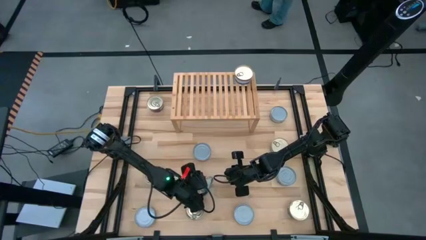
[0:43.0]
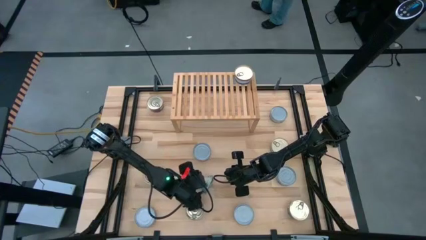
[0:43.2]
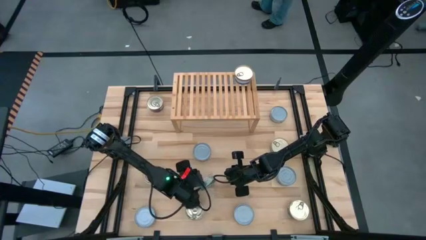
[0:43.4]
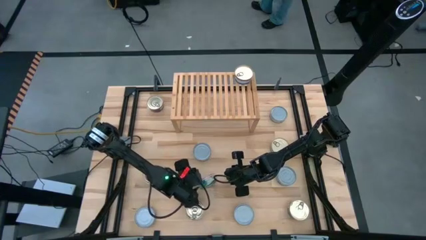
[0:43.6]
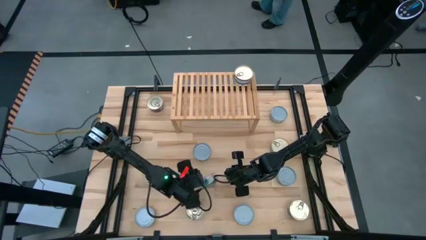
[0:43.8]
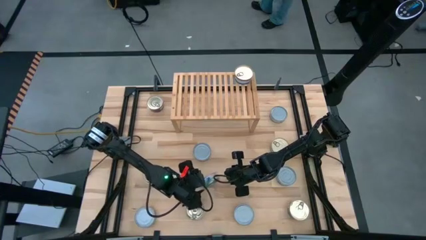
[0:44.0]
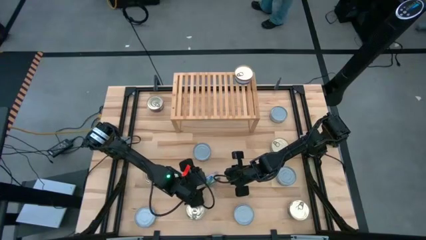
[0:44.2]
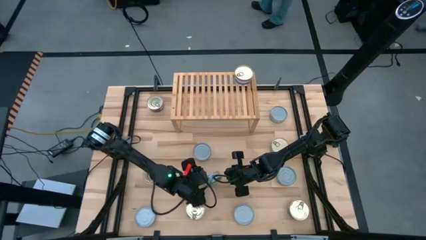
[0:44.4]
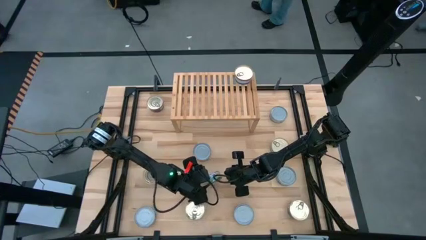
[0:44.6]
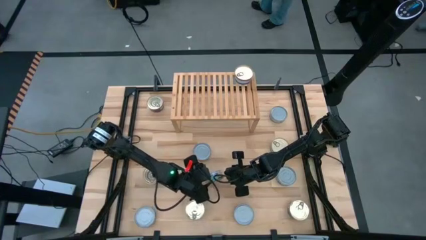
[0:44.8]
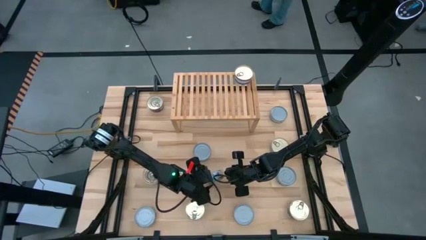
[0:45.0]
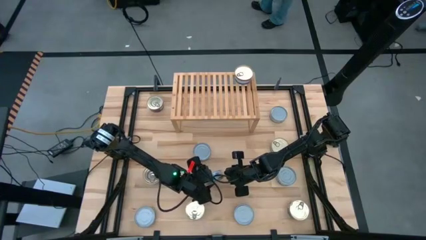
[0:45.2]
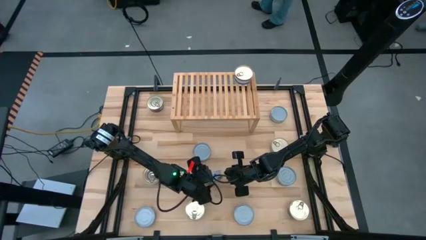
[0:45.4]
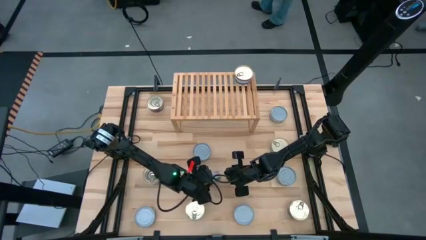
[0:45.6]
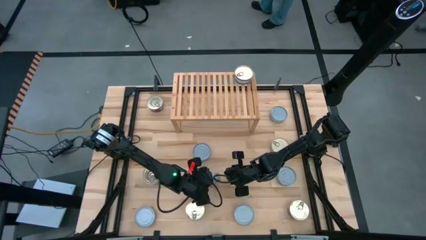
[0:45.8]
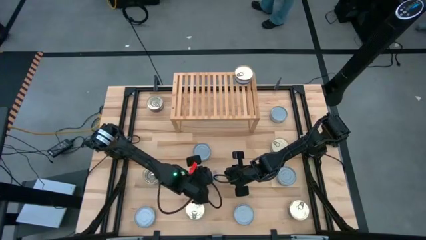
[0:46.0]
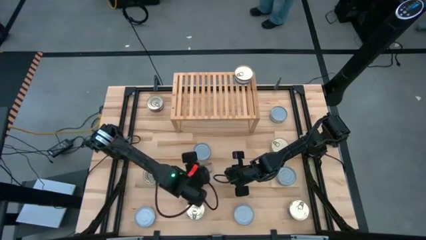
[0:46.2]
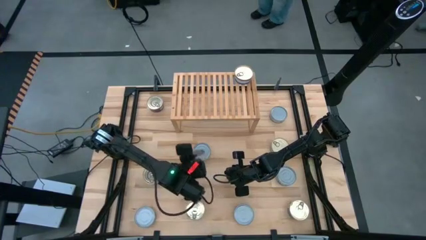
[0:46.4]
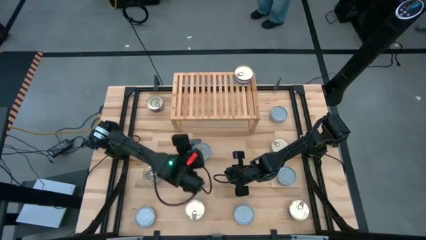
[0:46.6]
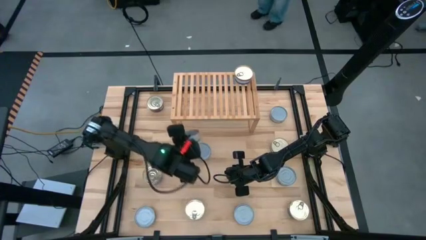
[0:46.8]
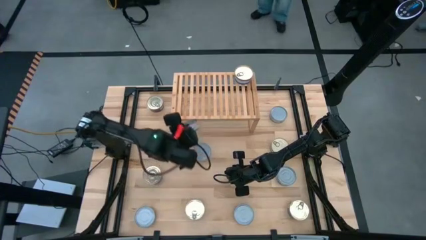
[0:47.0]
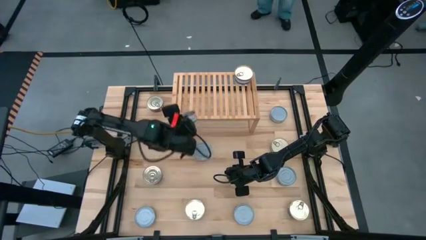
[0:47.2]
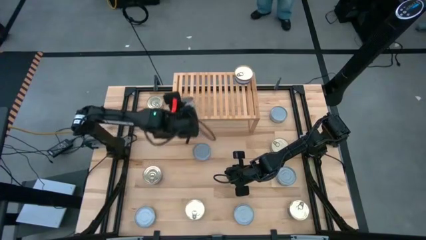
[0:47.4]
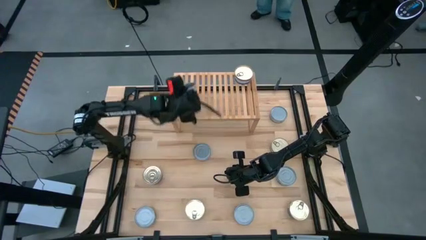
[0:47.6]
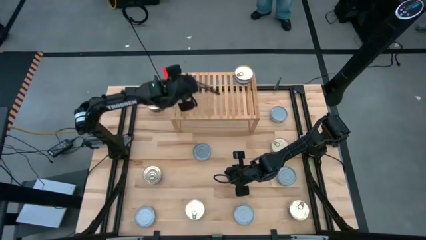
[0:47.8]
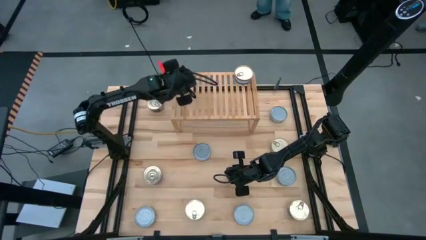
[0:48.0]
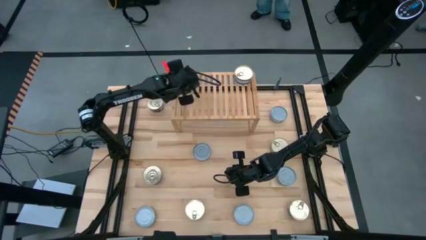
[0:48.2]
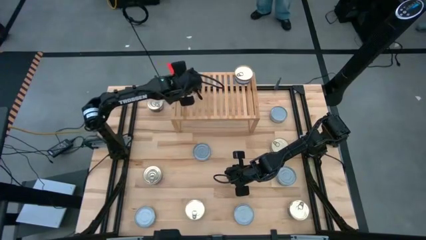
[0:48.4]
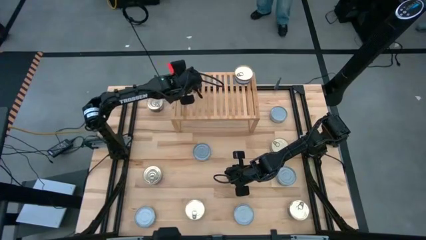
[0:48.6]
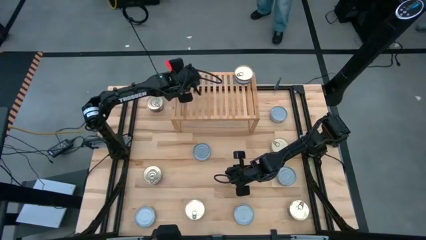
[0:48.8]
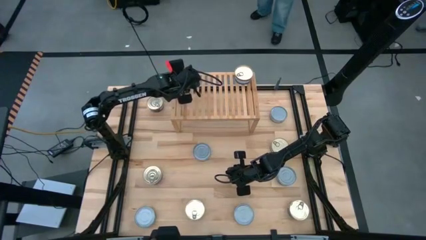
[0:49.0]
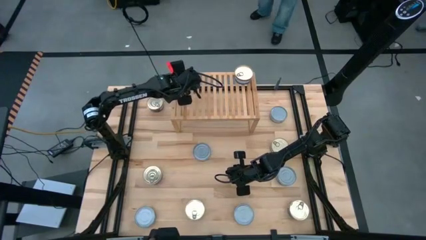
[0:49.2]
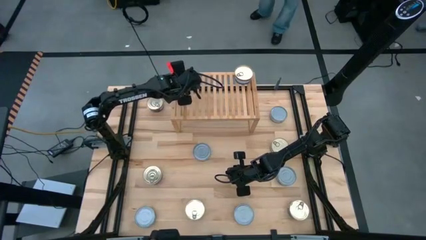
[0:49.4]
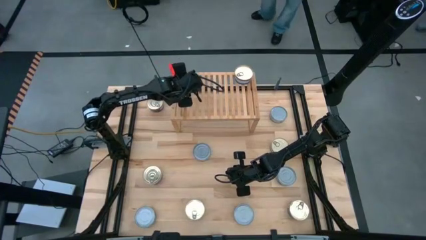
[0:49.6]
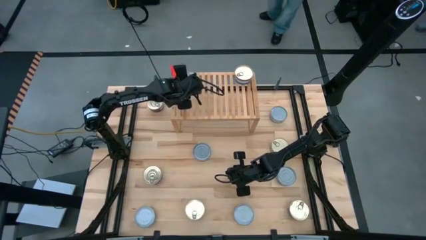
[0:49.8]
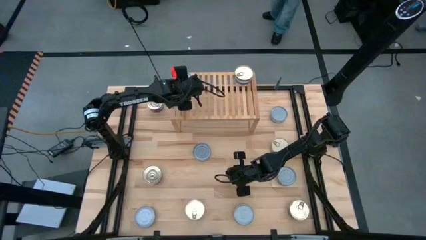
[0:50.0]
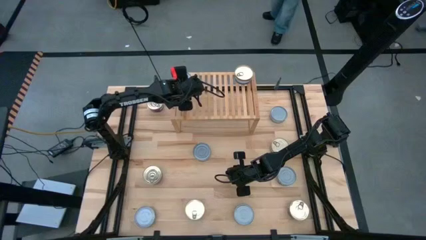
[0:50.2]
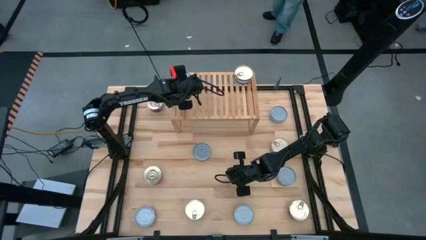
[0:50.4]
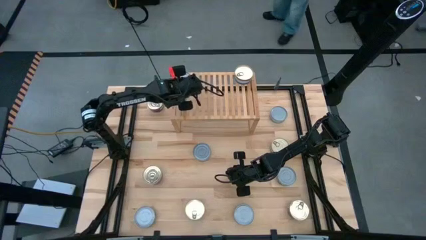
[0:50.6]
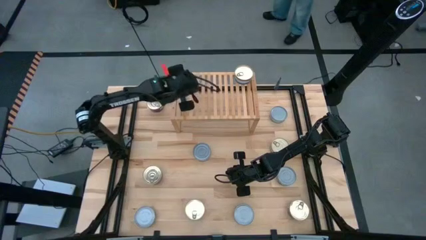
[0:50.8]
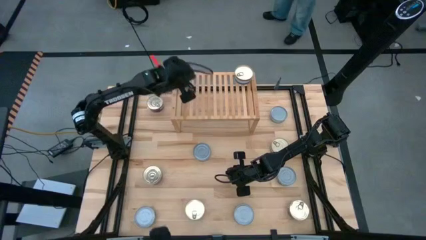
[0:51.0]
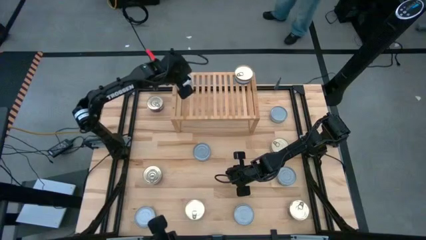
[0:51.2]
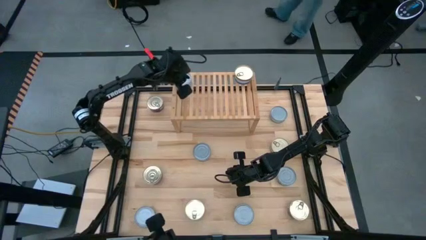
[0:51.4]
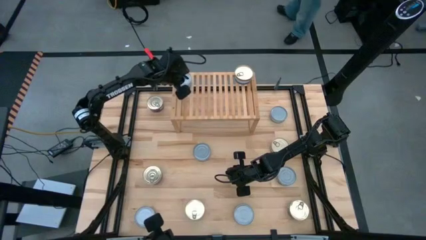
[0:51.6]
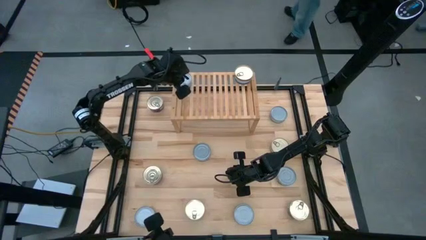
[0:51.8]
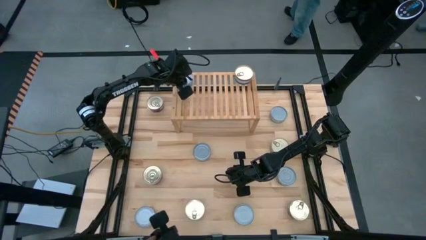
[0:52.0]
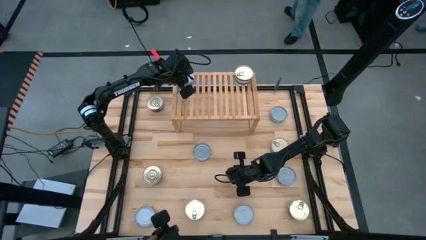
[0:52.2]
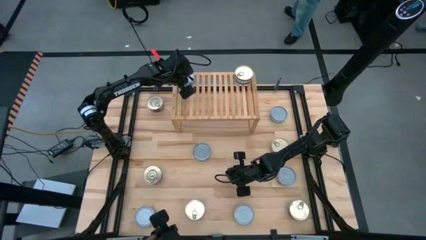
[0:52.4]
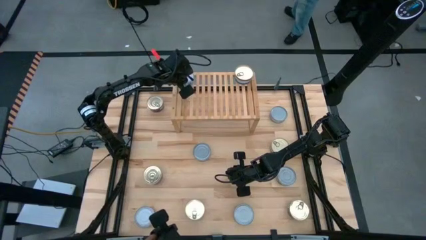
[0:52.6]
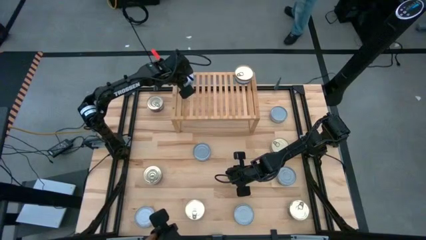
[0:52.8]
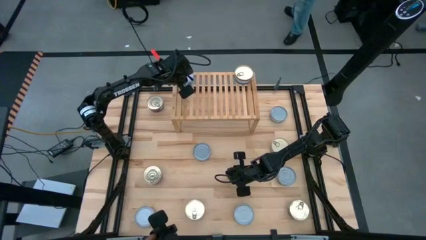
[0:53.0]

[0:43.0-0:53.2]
Task: Stack canned seafood by type on shelf
Put the green tuna can on the shelf

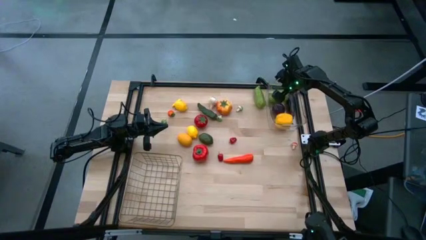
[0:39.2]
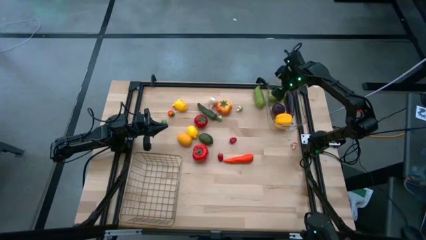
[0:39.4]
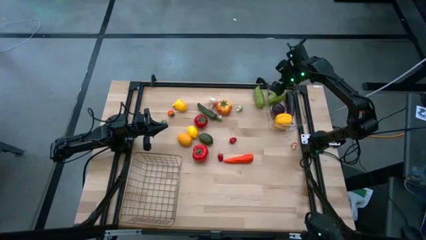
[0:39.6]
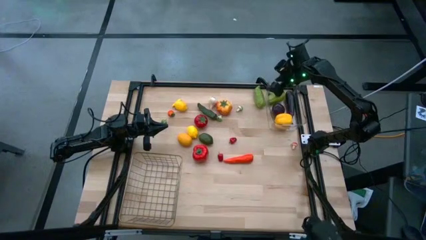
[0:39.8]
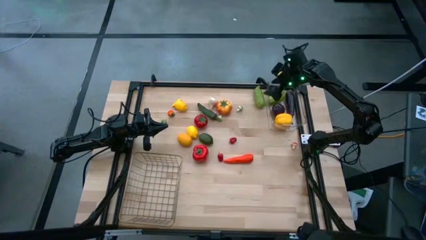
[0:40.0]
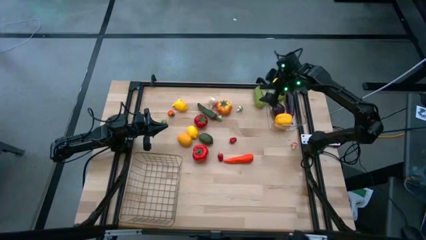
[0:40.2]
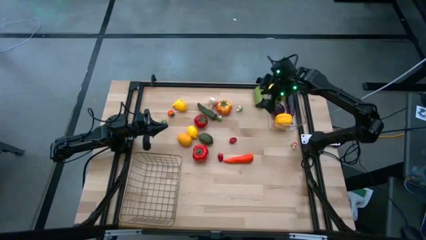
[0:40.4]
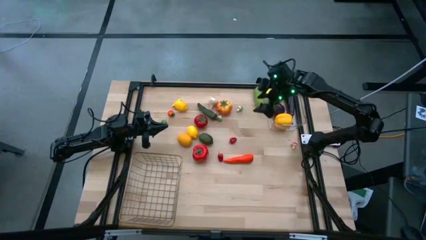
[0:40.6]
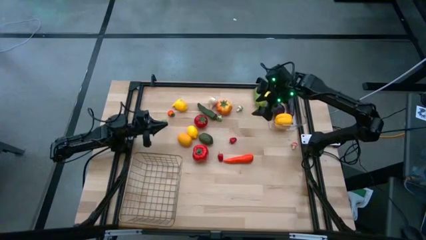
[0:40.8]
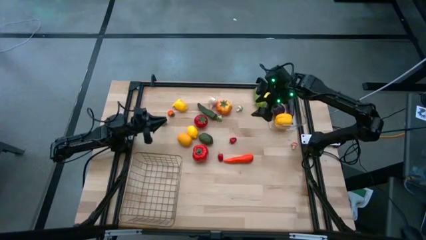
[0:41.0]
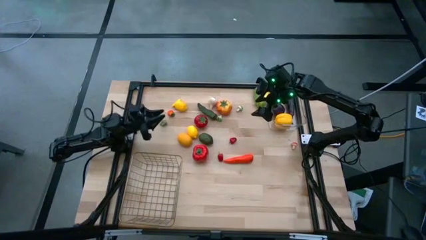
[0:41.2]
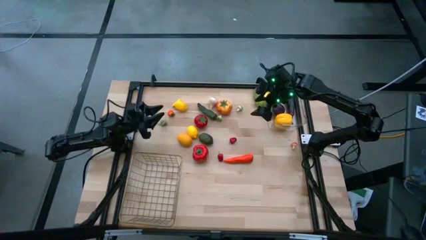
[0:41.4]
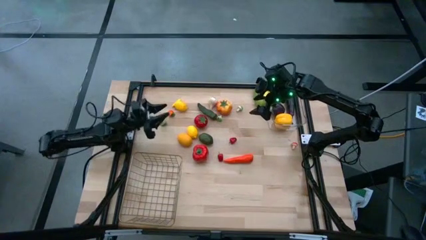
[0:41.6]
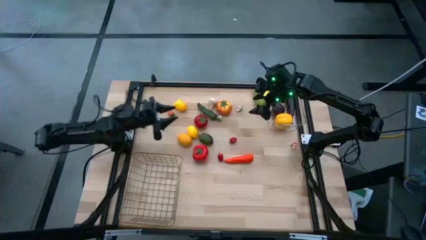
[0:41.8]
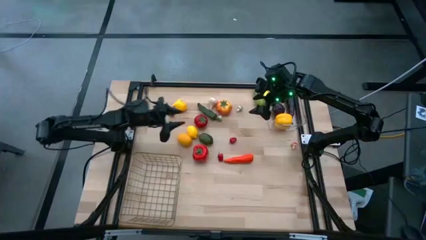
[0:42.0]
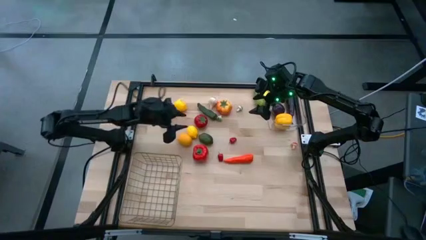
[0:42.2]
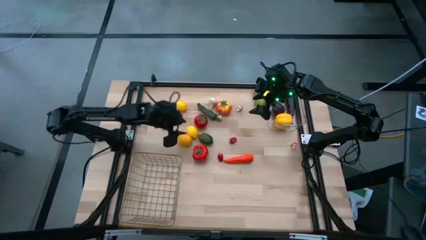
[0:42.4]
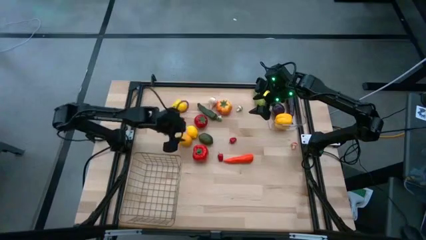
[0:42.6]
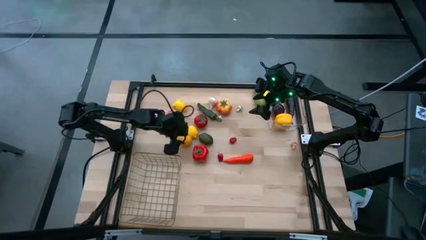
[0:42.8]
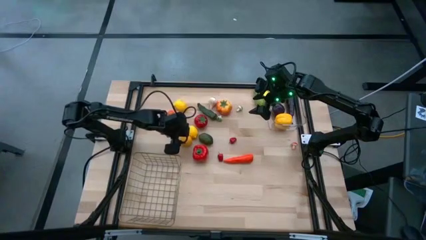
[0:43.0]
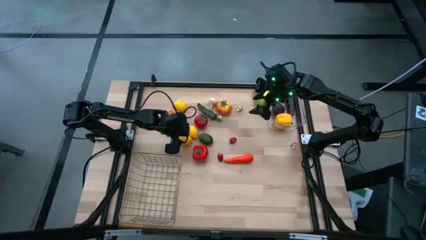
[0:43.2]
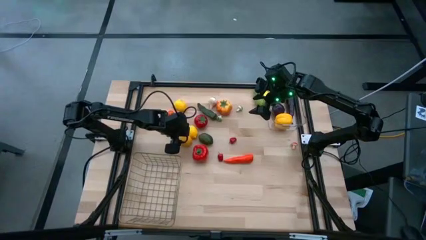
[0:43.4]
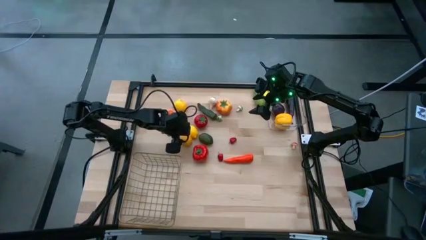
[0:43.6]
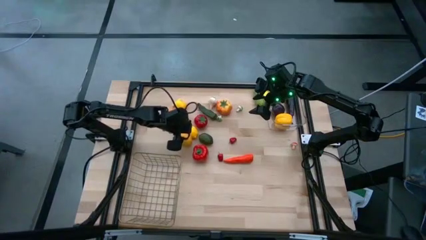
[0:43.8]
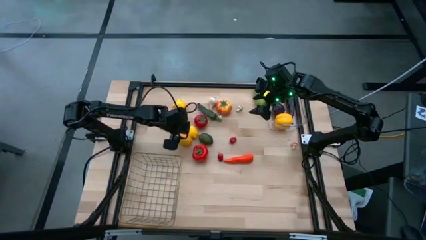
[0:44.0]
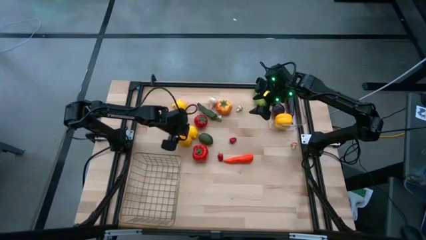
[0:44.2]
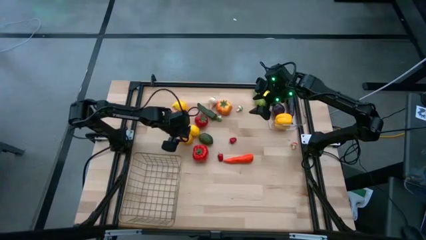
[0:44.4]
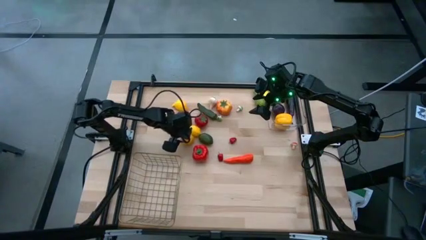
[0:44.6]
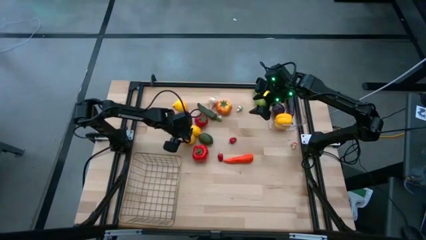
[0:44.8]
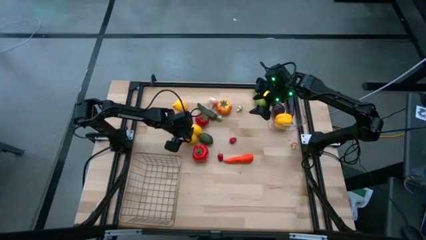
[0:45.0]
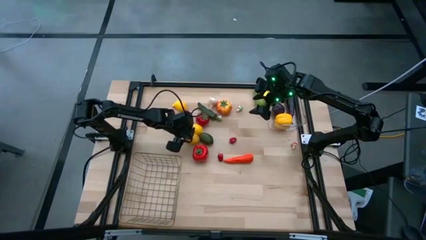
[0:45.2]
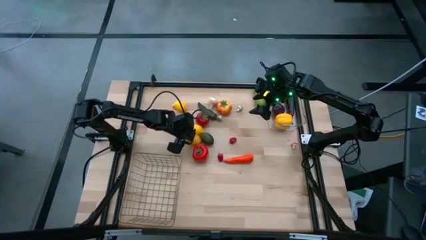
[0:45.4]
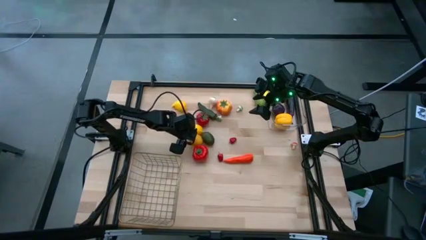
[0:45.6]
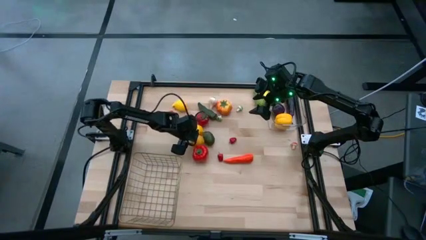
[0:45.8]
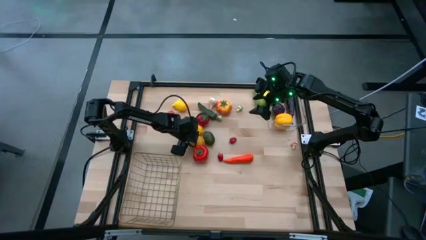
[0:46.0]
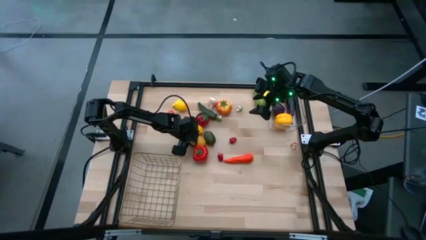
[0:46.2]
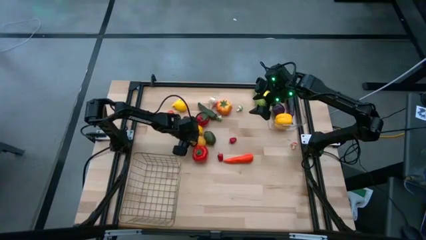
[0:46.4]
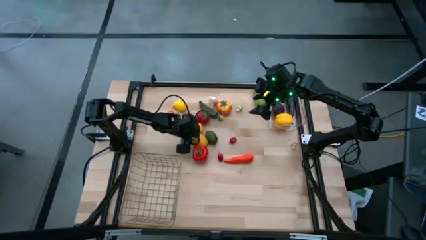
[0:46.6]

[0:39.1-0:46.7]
Task: Sort produce into baskets
Put the bottom yellow lemon into the wire basket
